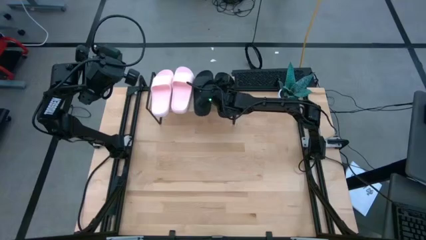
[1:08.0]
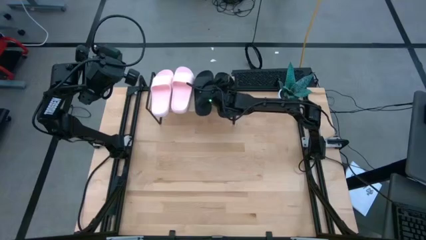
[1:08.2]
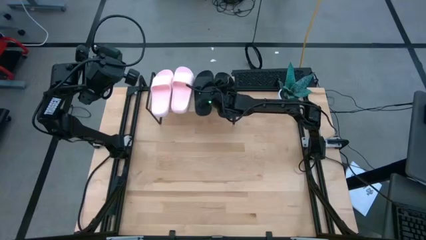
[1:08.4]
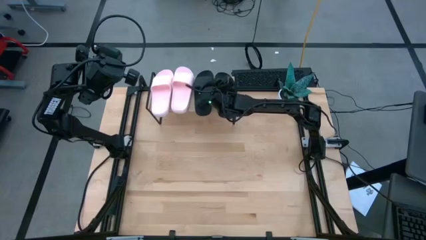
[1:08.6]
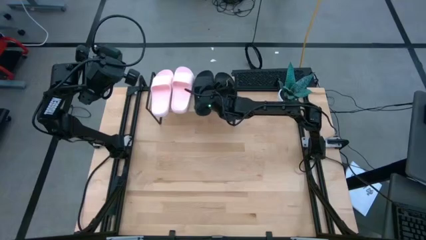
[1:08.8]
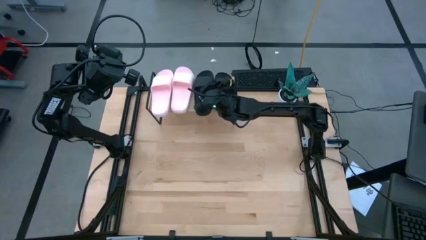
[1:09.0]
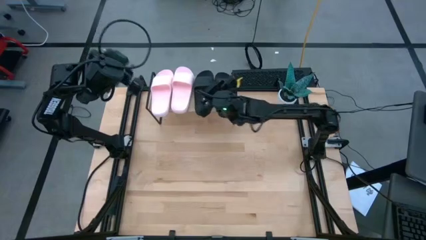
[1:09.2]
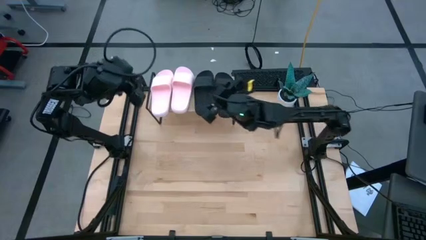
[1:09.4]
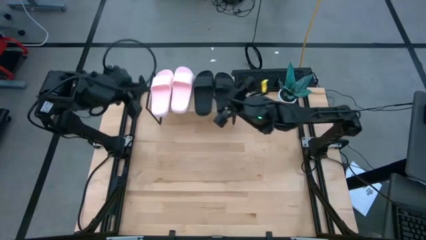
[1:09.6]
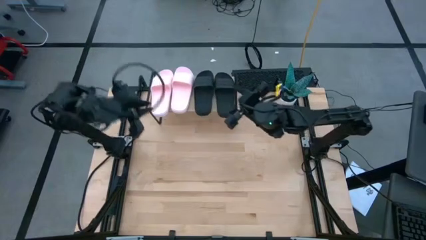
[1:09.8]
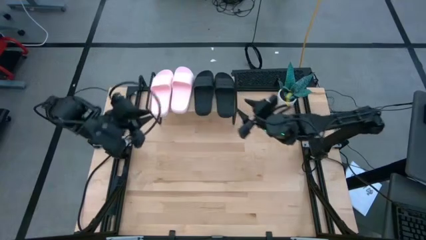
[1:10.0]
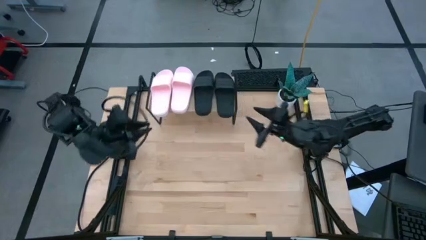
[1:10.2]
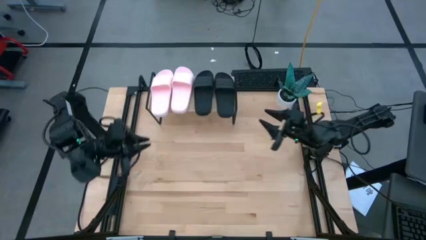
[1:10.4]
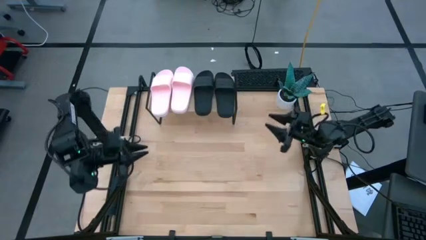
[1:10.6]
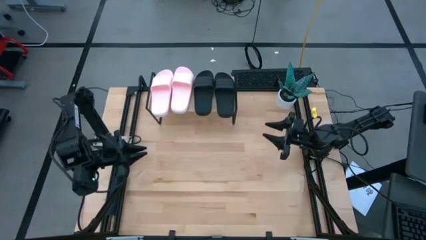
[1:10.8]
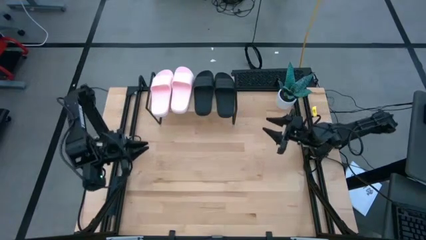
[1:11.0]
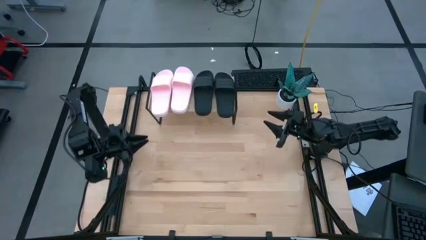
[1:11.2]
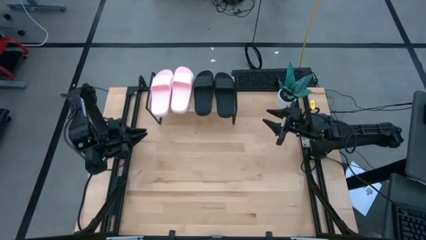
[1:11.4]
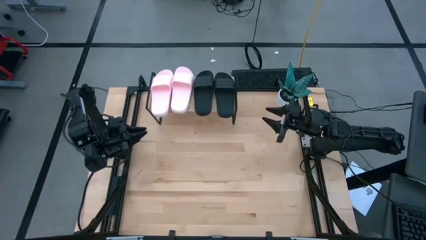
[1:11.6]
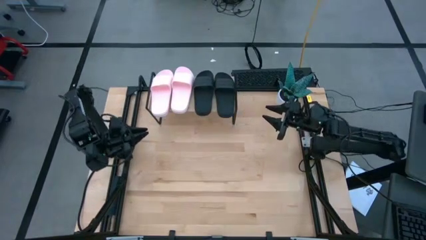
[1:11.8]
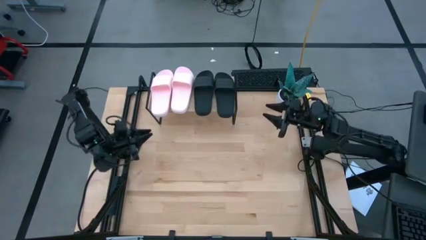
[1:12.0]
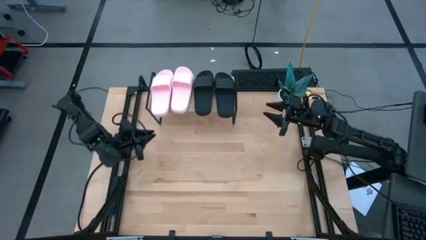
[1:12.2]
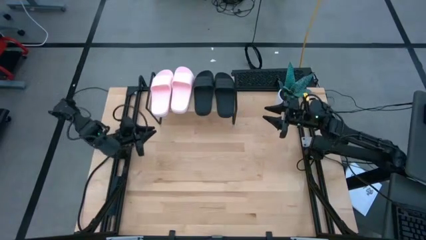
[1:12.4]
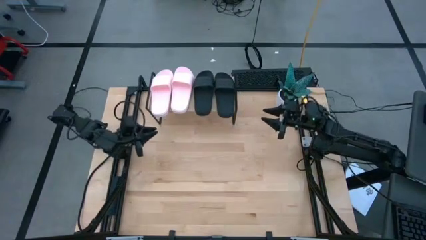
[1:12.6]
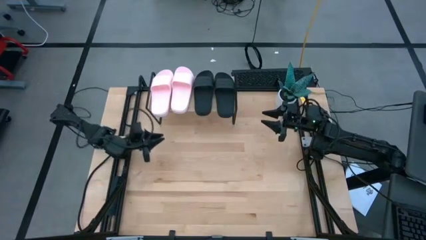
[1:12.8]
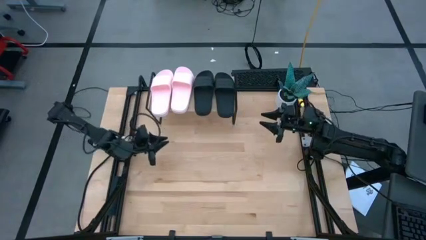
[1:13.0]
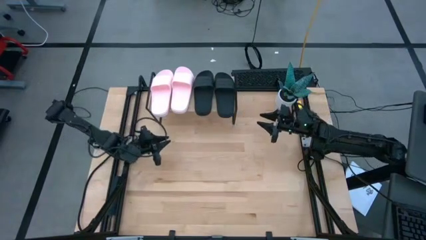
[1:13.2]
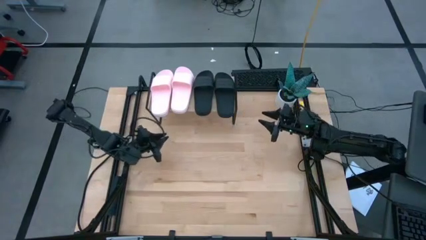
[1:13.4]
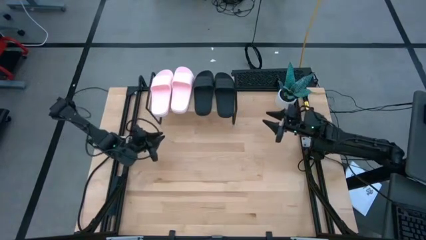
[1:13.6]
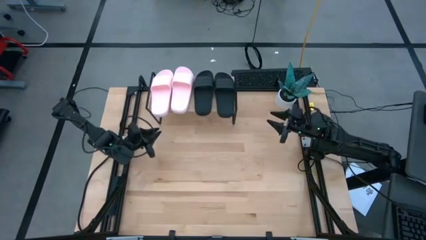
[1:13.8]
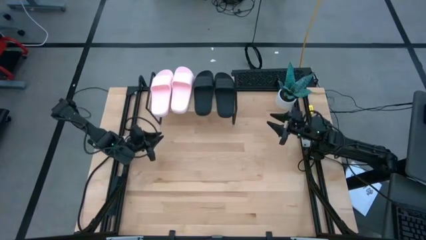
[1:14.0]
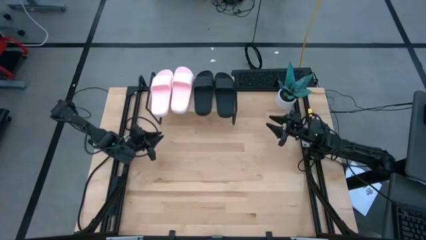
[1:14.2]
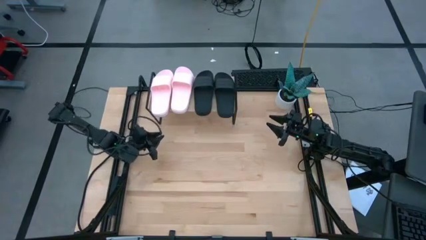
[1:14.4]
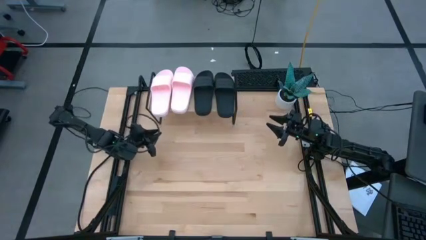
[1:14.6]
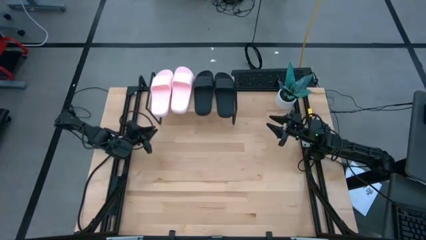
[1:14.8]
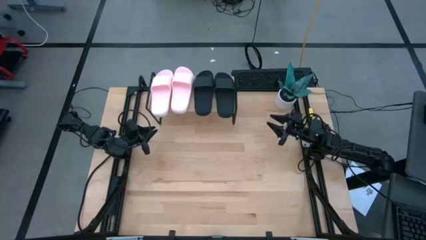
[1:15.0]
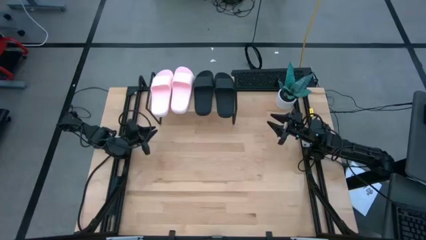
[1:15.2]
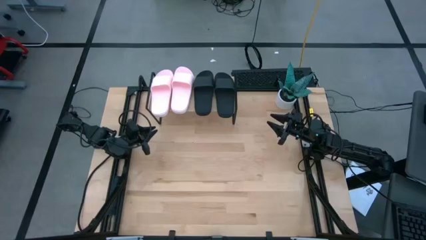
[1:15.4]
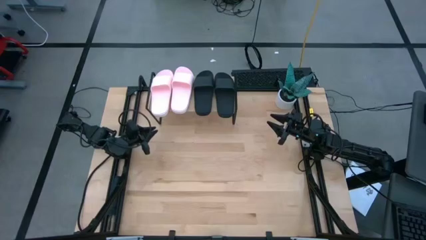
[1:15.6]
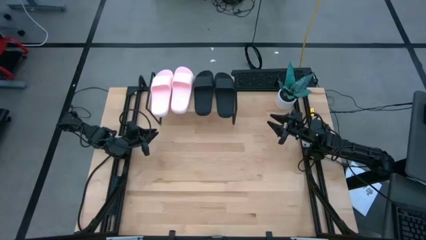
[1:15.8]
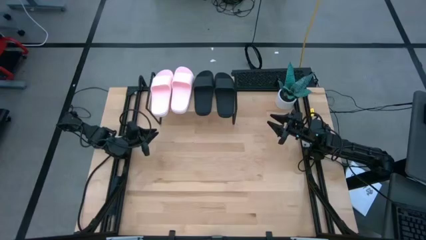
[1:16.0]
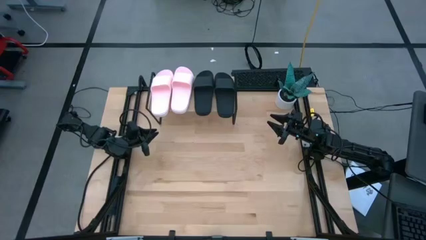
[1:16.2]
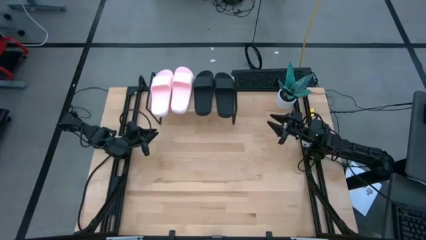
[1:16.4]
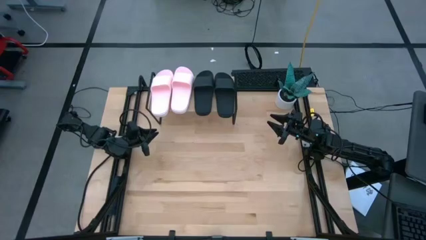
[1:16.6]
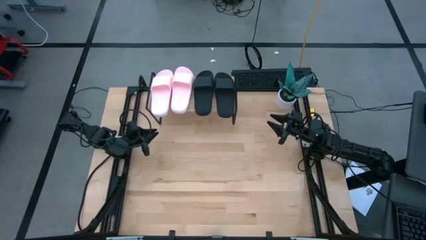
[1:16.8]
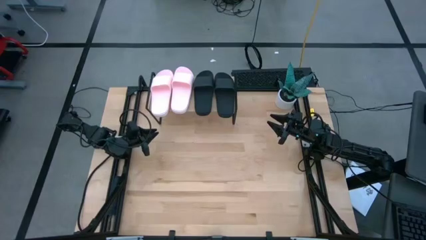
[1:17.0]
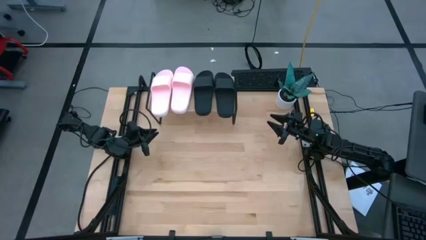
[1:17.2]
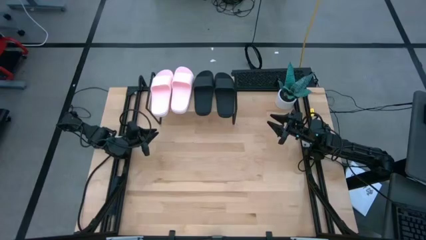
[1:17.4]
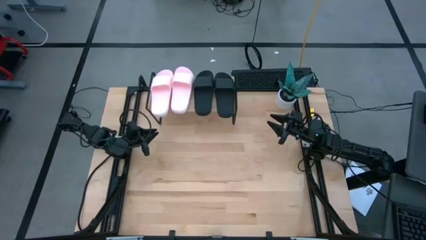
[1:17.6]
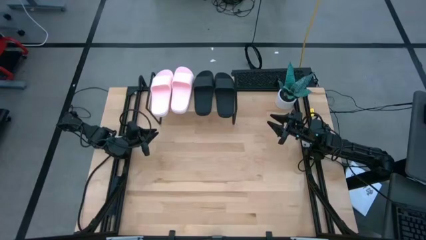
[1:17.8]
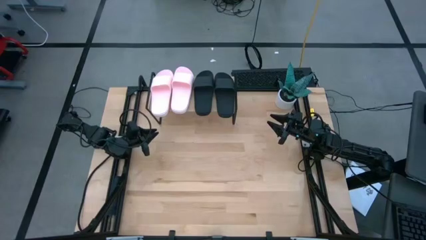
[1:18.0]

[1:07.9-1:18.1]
Task: Pick and place slides into the shelf
Return to Home Position
